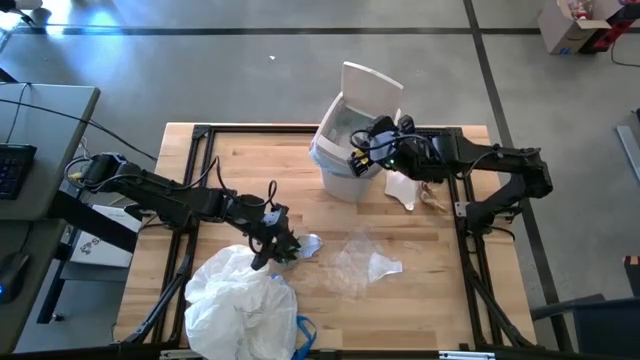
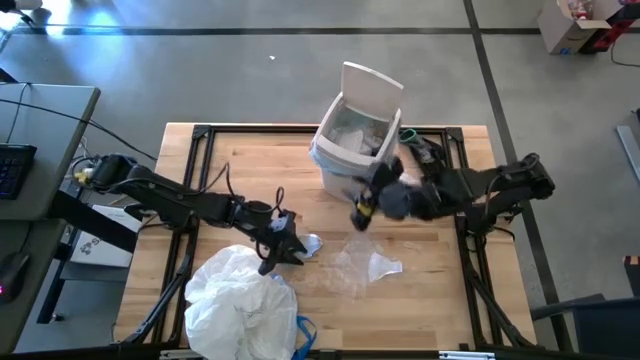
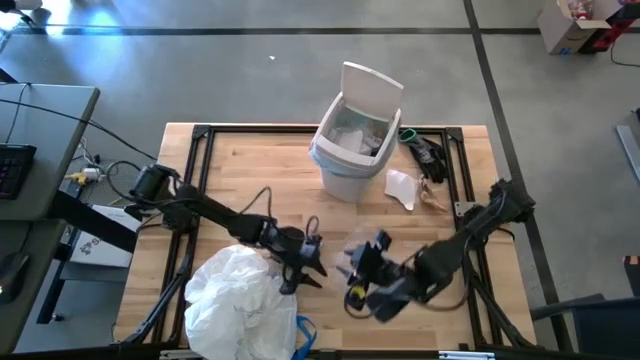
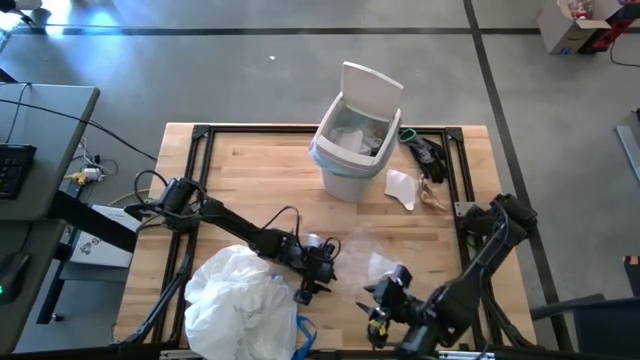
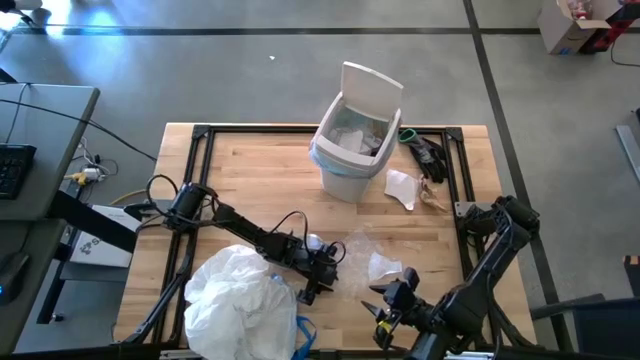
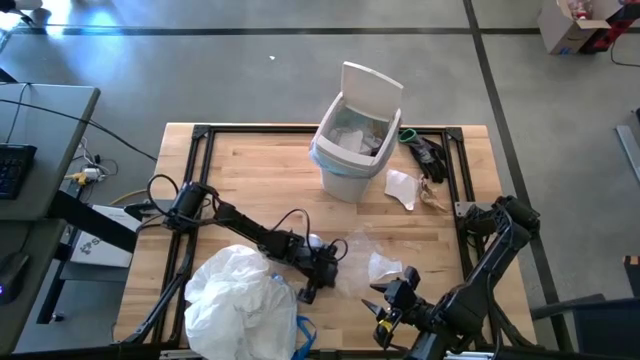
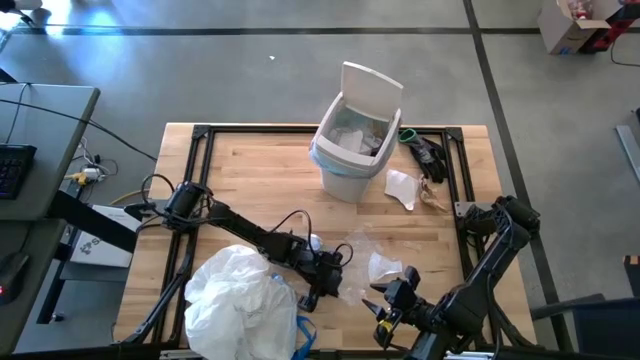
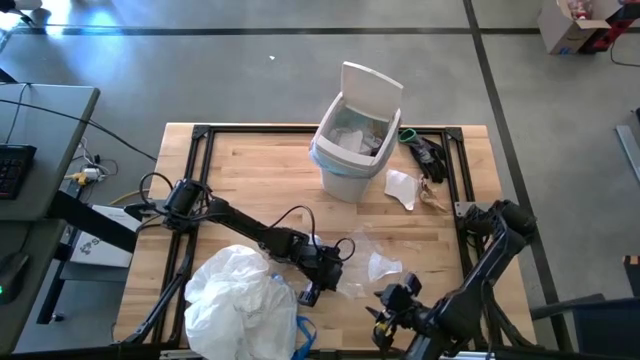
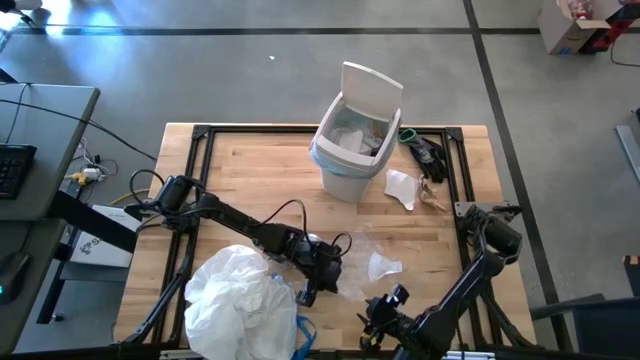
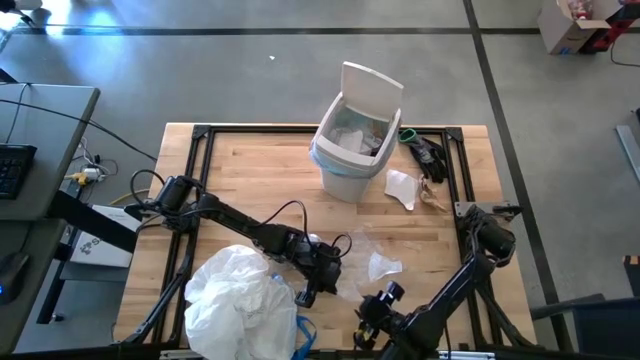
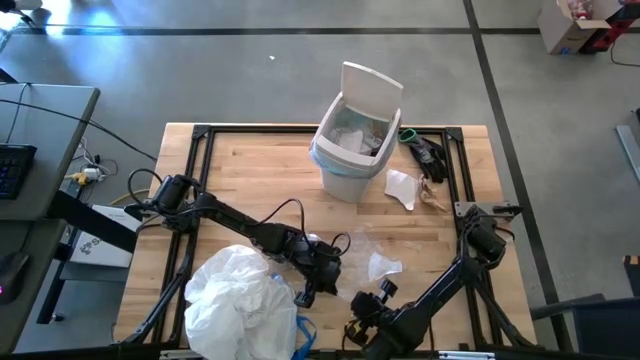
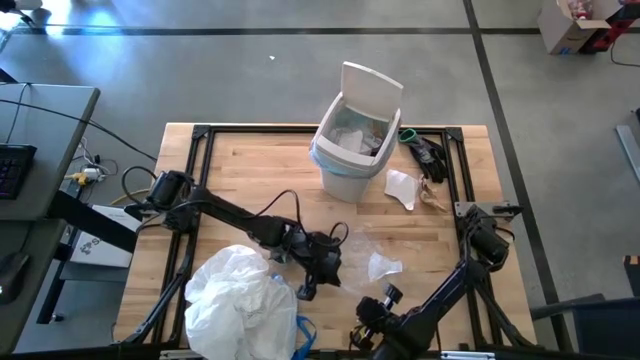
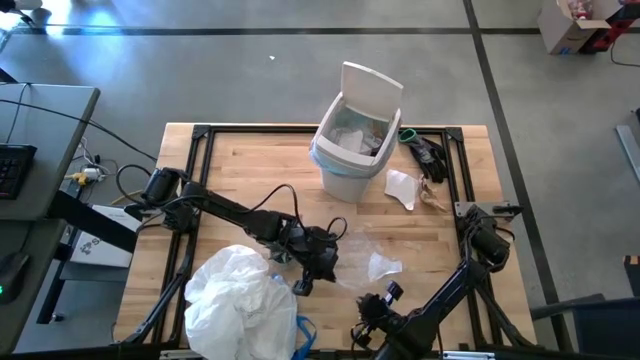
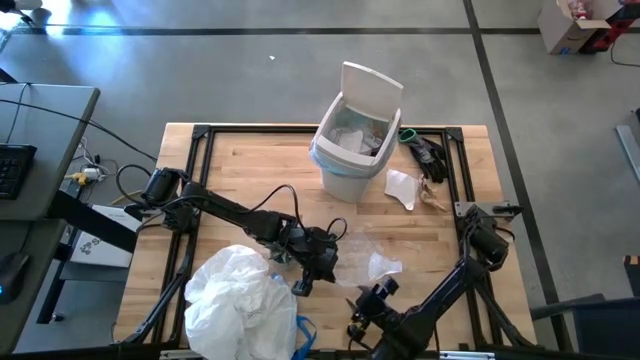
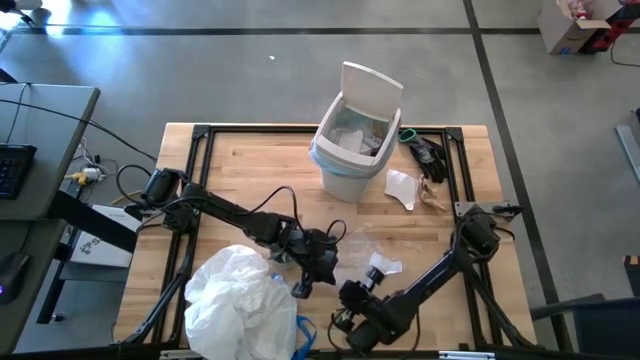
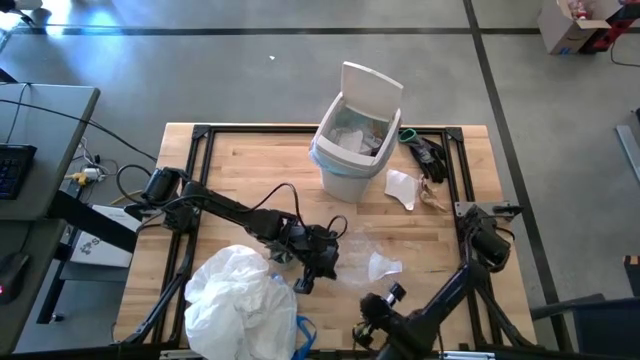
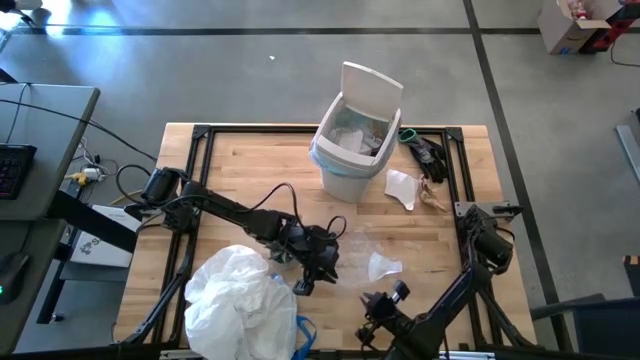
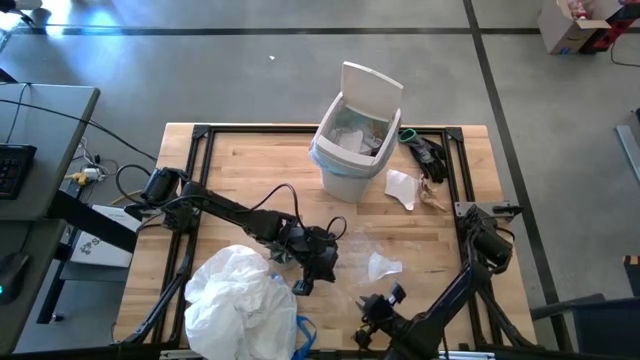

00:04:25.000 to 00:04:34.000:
Task: place trash/remove bag and relplace
Put the transparent plastic into the trash bin

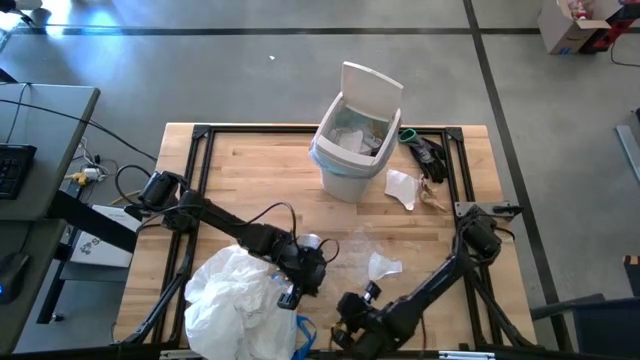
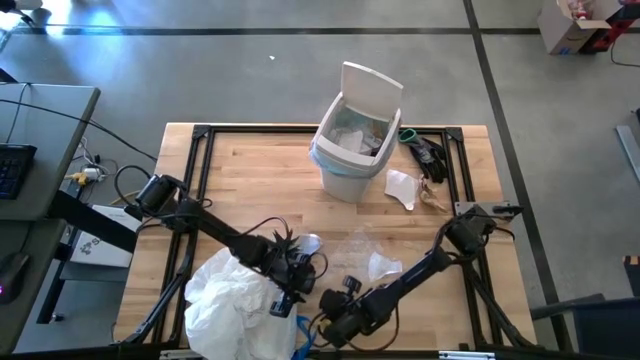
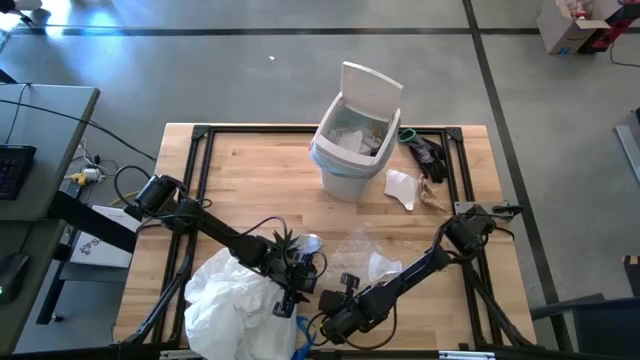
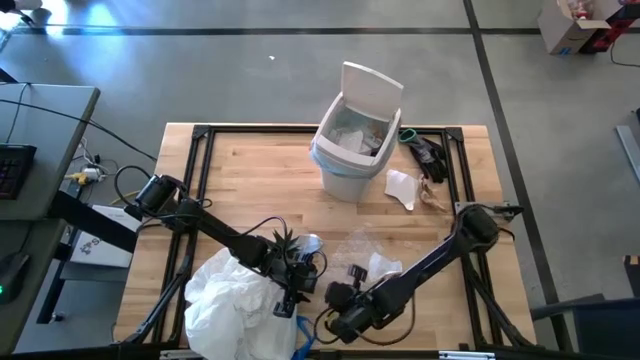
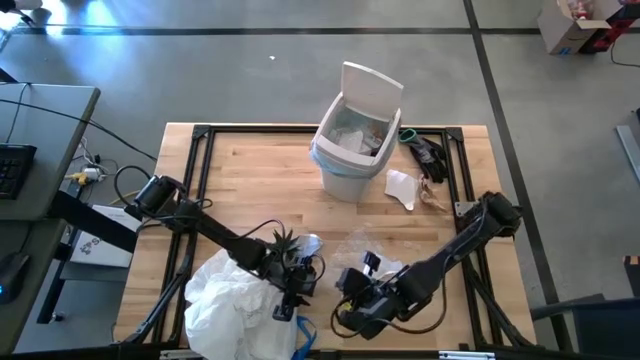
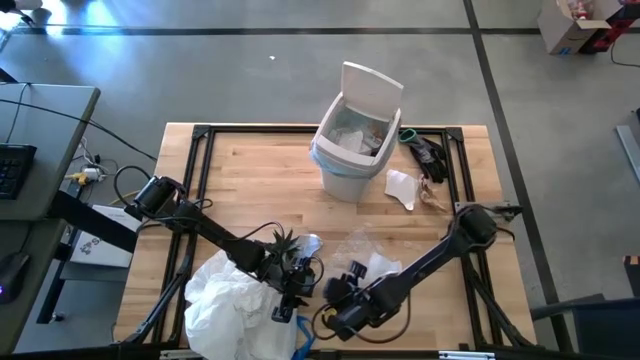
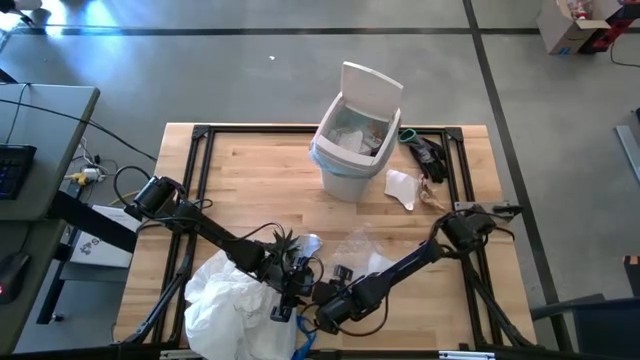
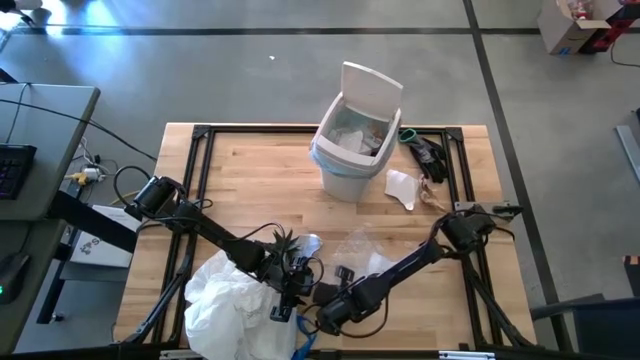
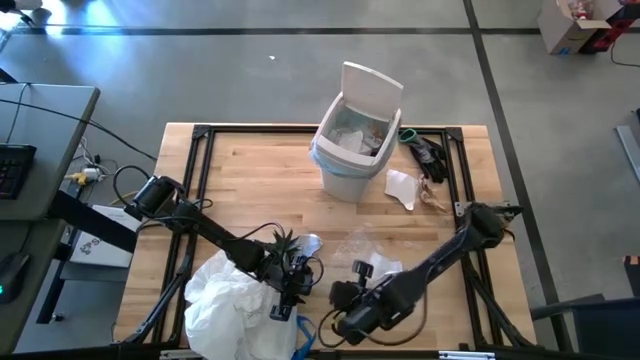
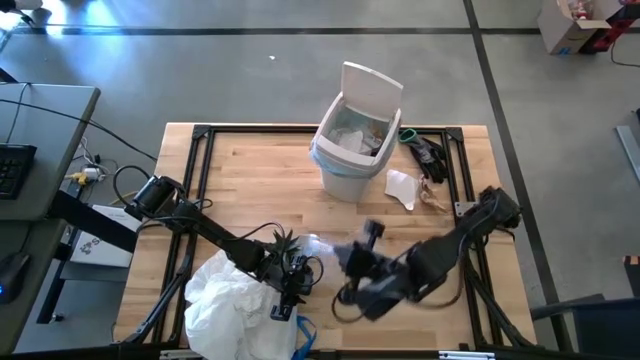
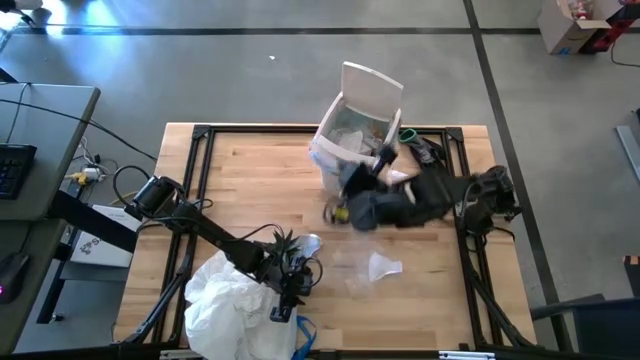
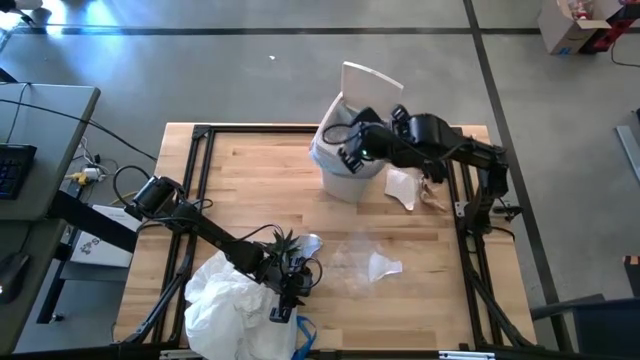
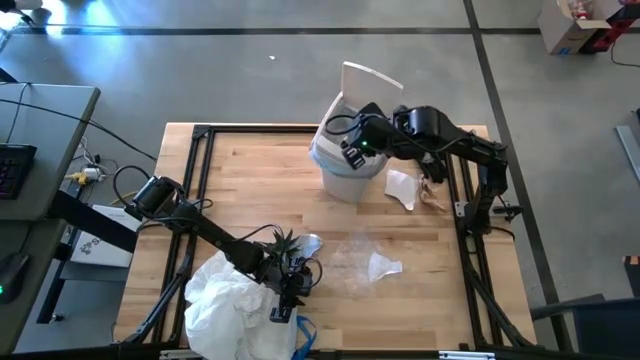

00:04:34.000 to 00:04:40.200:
Put the transparent plastic into the trash bin

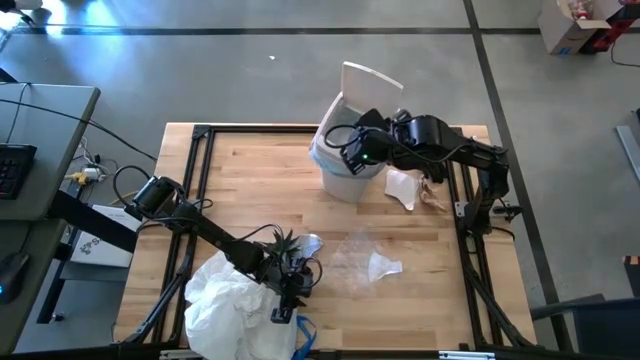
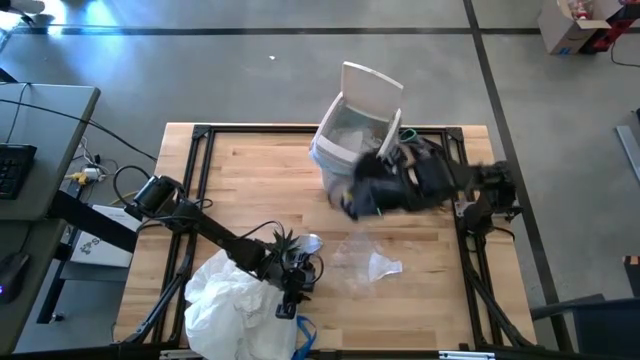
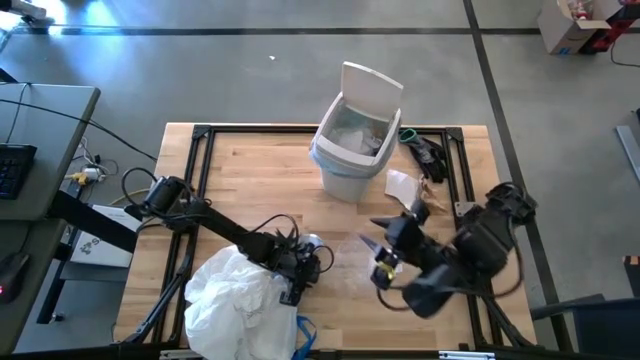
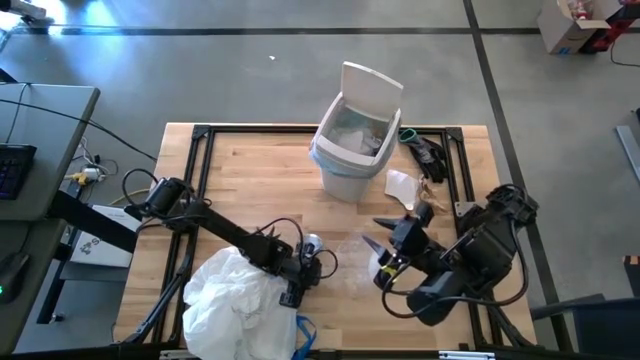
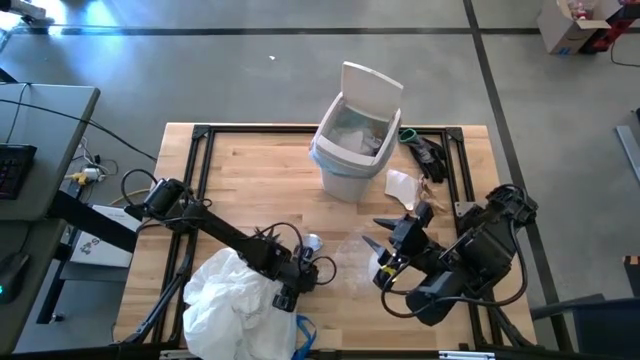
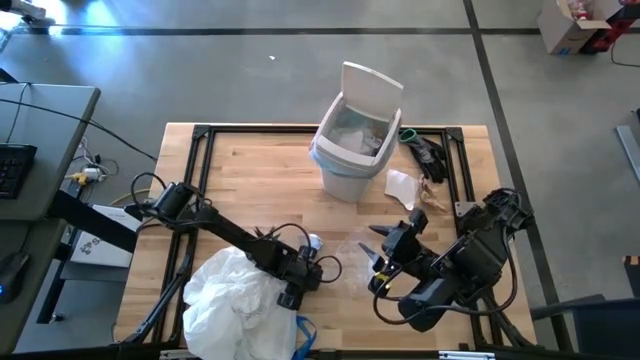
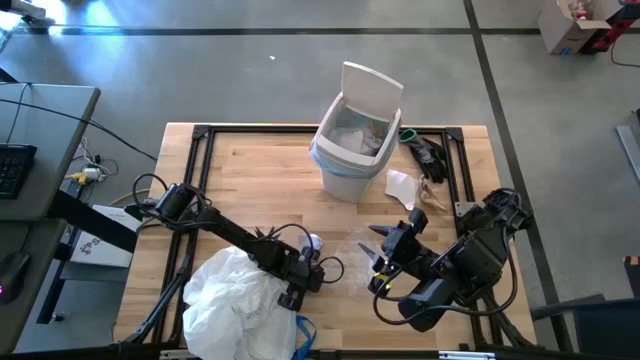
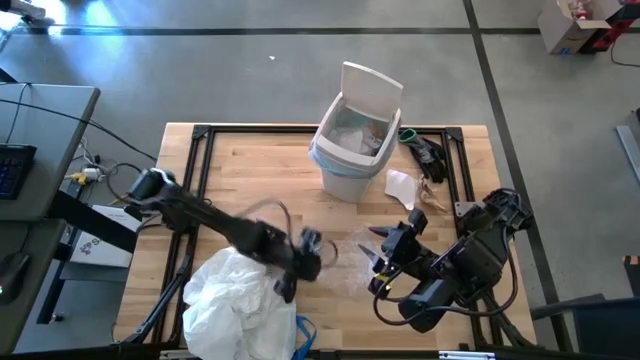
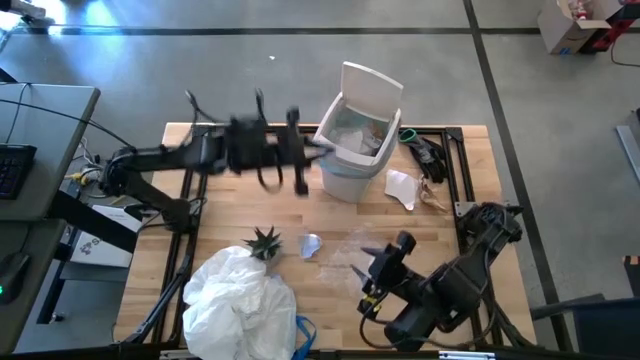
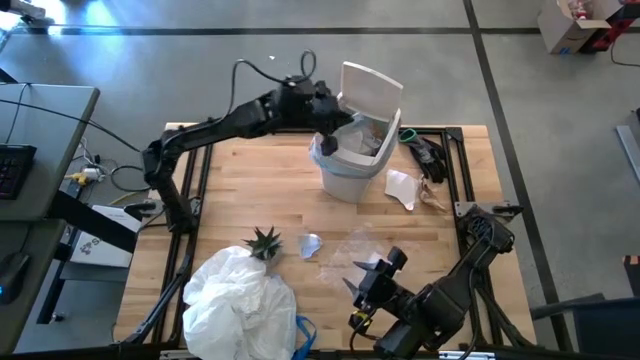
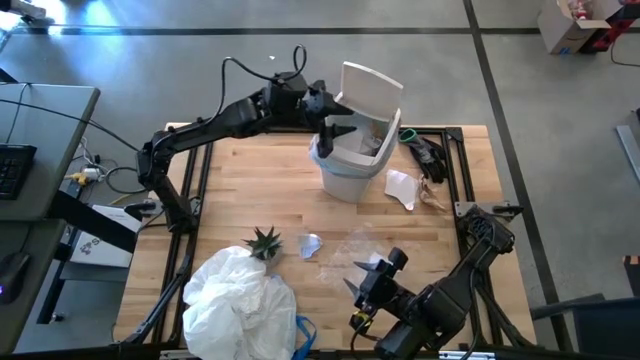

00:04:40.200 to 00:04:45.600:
Put the transparent plastic into the trash bin
